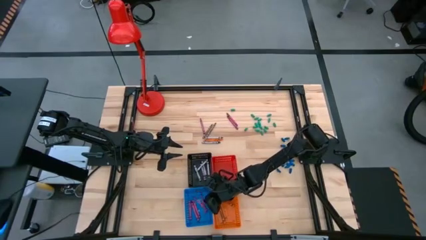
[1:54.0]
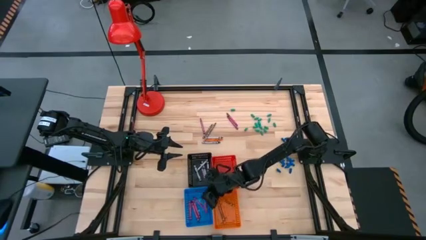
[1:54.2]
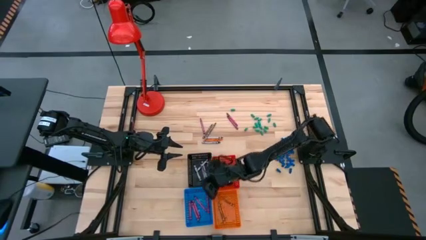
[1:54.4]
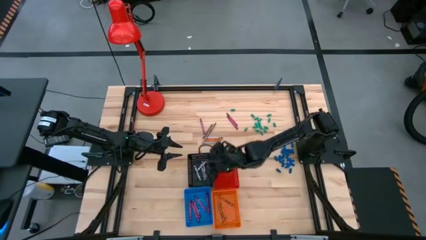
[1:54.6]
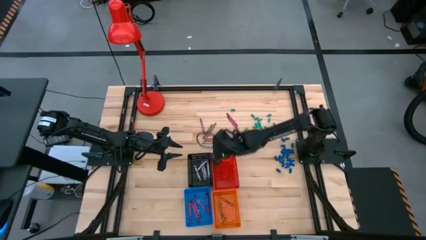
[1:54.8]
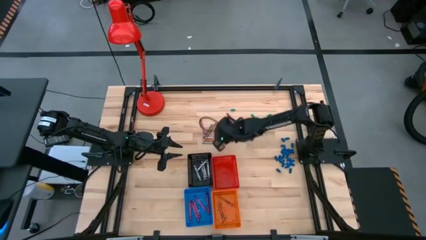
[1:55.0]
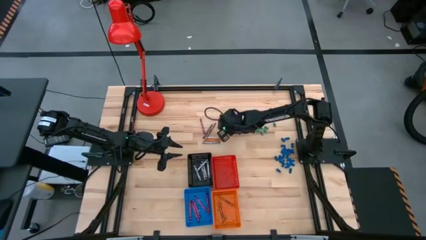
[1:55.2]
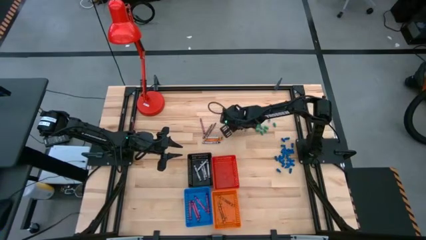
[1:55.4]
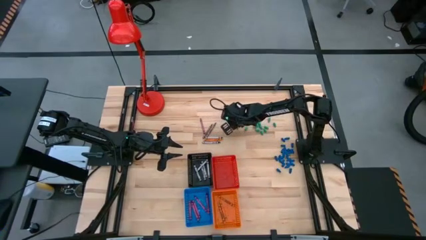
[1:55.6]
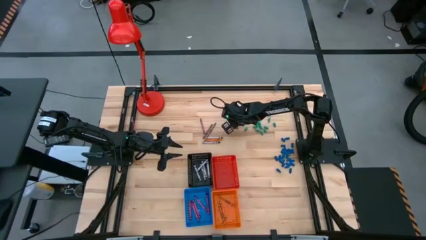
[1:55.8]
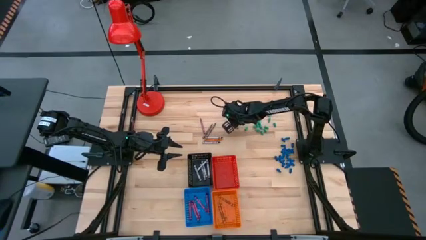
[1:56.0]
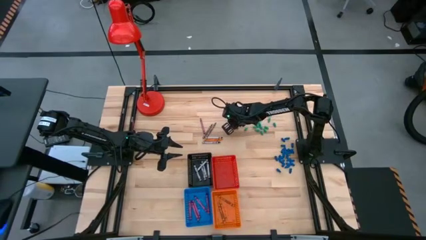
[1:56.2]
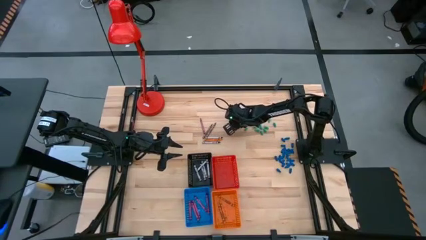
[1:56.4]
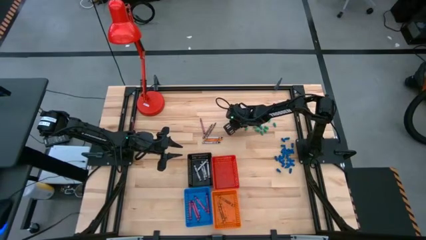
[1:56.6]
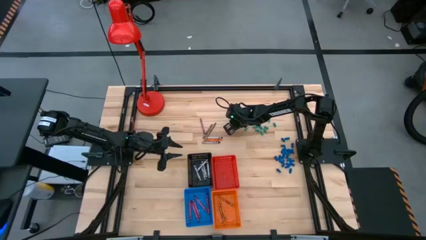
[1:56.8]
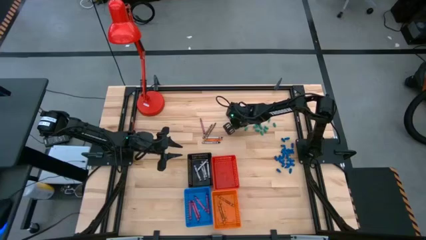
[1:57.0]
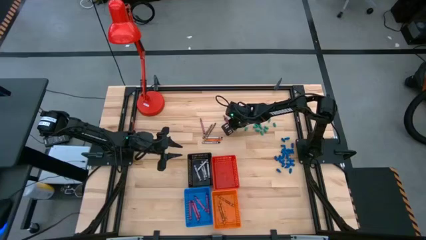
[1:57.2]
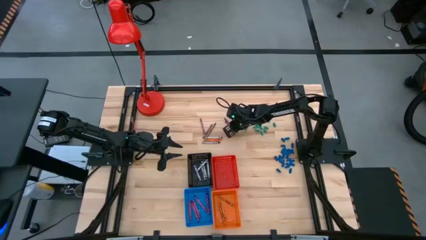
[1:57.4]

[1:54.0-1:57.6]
Task: Sort crayons
Put the red crayon into the blue basket

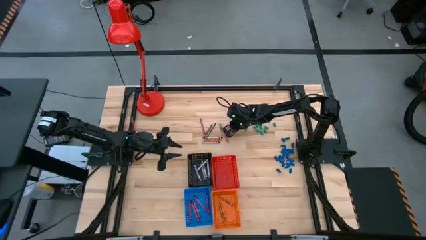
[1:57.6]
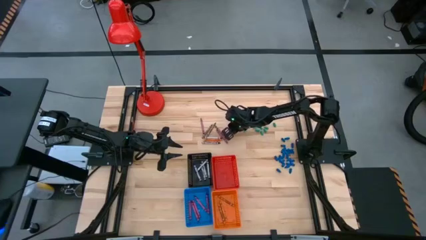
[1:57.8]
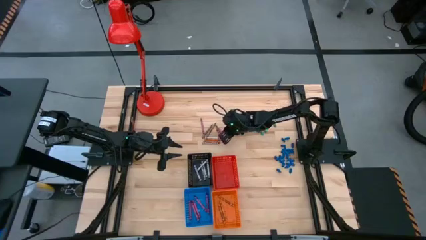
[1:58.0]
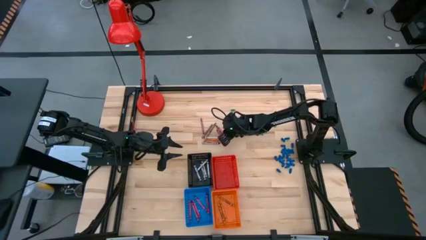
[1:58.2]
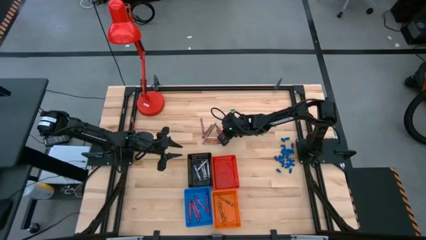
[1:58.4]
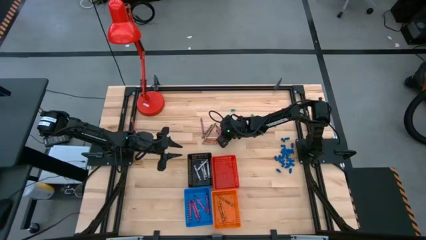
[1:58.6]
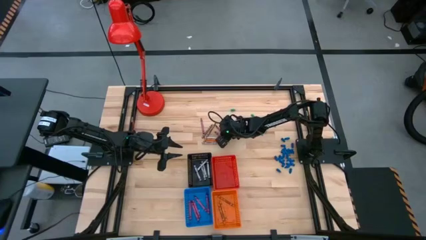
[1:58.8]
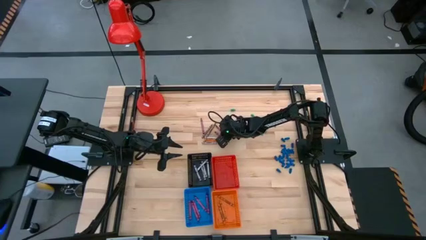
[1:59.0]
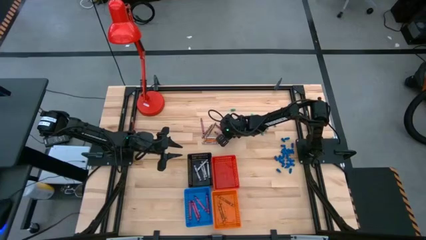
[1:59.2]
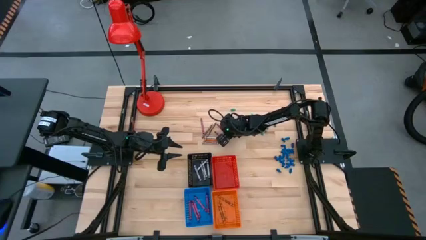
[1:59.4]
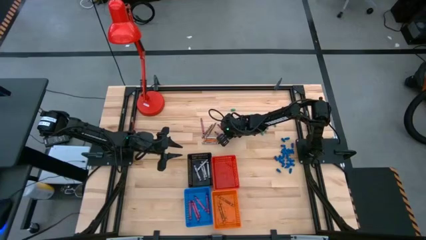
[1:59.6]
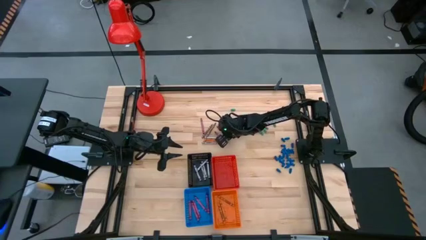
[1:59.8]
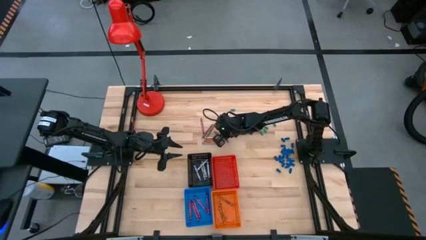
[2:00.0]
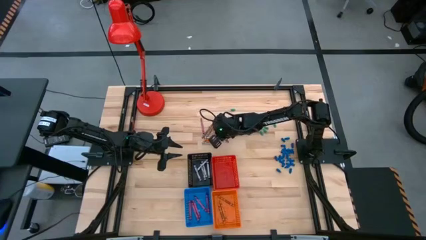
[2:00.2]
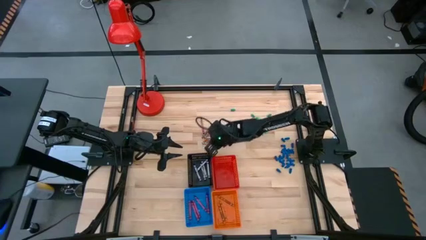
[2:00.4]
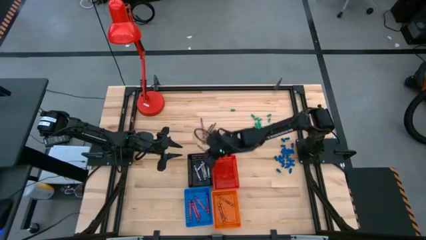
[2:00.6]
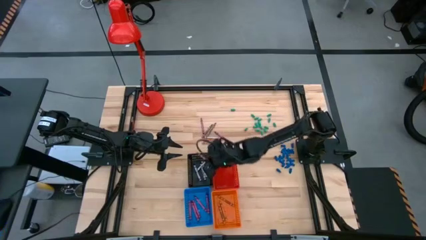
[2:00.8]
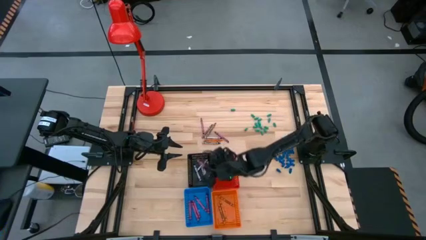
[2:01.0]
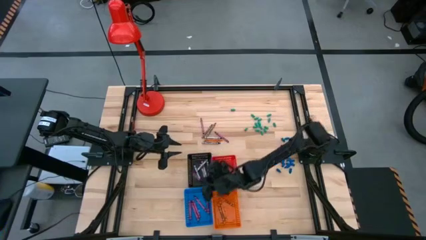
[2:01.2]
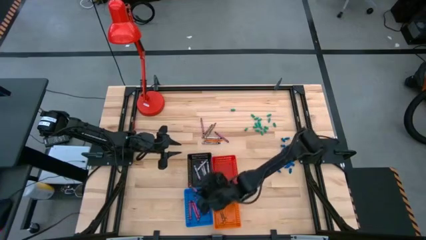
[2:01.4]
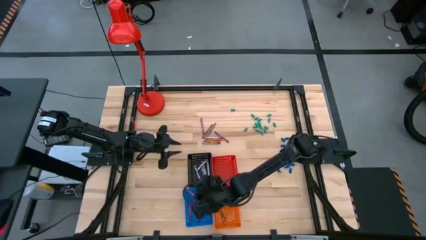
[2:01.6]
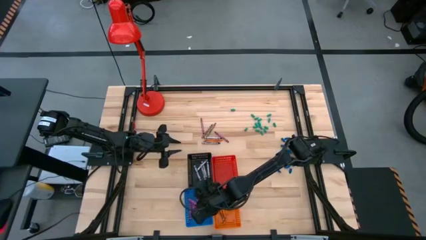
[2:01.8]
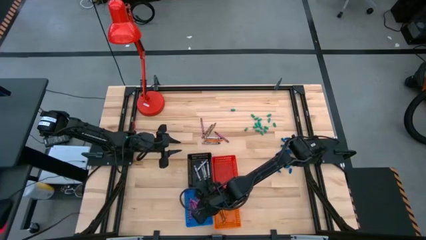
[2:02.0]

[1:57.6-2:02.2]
Put the red crayon into the blue basket

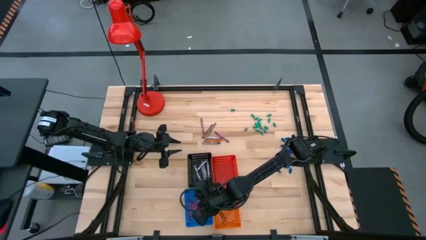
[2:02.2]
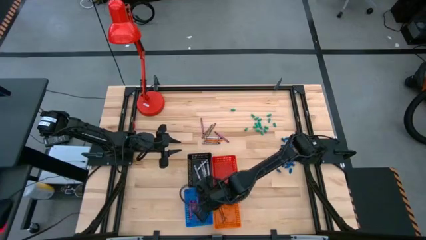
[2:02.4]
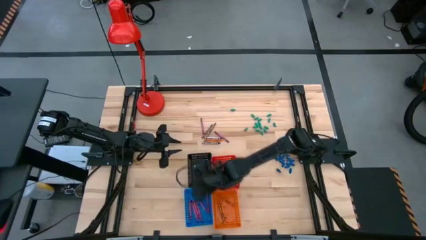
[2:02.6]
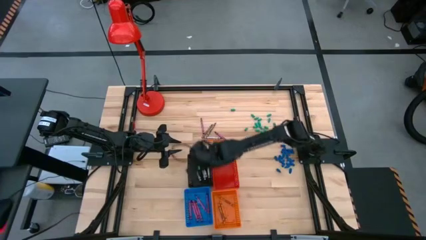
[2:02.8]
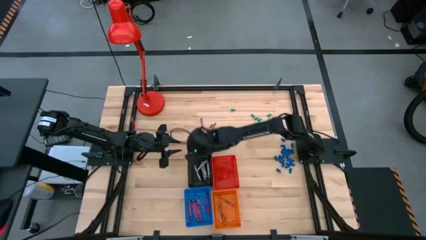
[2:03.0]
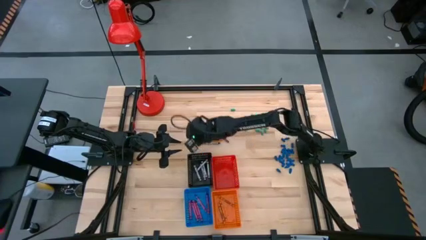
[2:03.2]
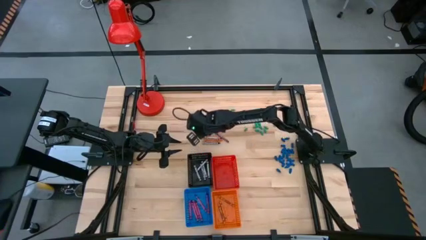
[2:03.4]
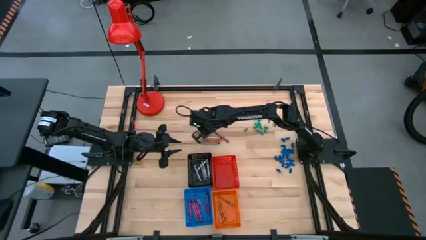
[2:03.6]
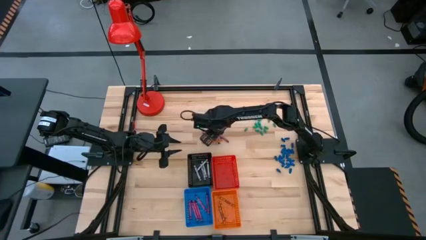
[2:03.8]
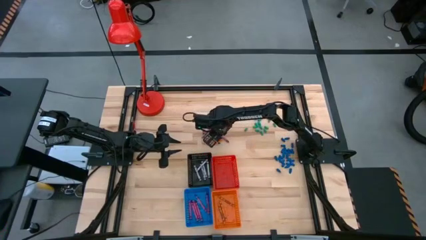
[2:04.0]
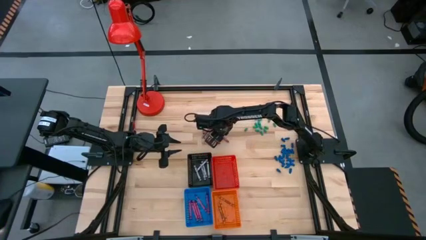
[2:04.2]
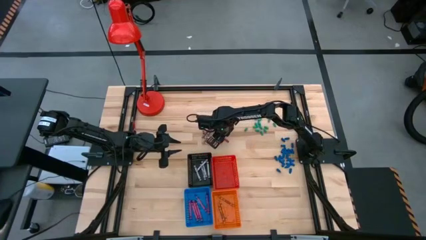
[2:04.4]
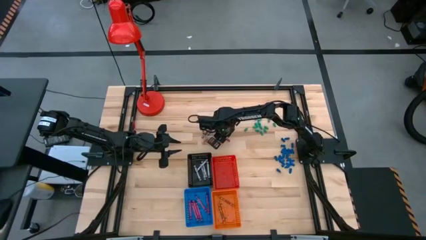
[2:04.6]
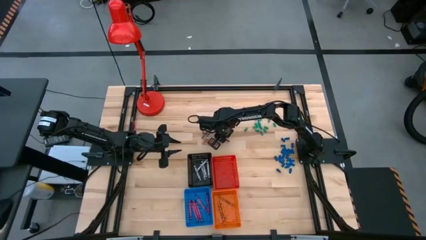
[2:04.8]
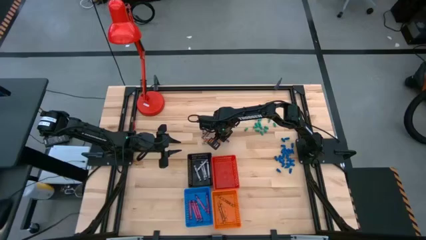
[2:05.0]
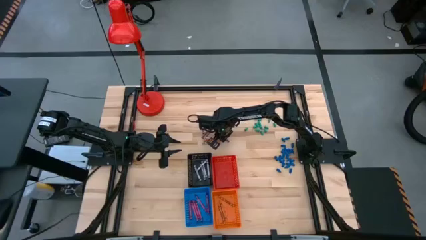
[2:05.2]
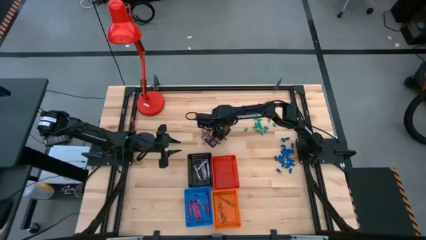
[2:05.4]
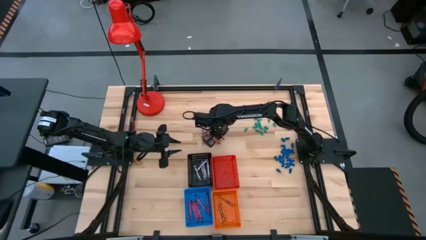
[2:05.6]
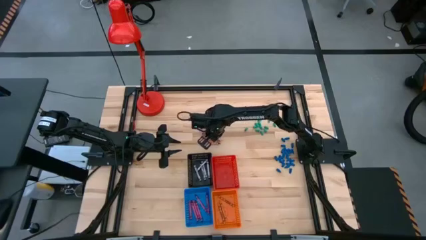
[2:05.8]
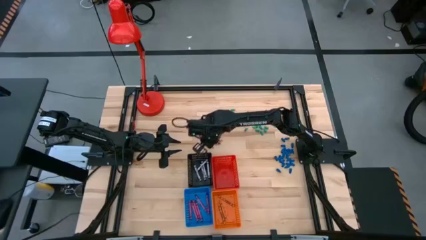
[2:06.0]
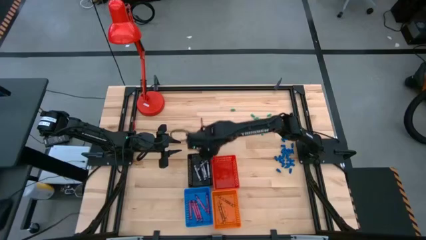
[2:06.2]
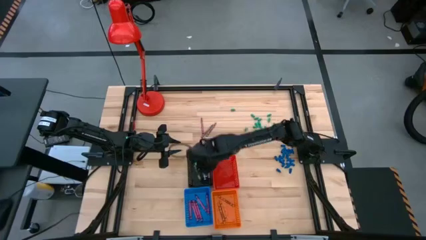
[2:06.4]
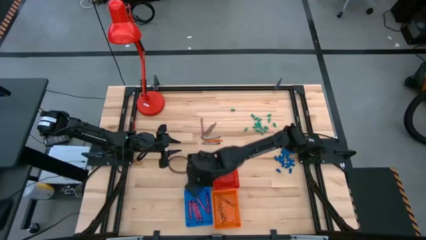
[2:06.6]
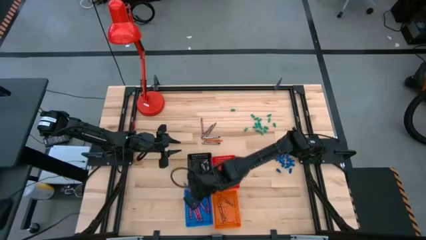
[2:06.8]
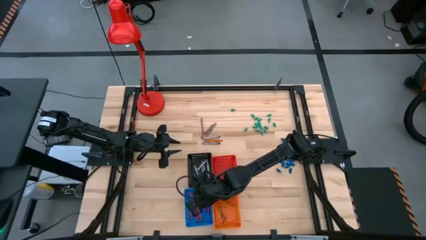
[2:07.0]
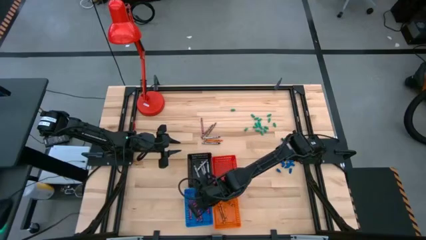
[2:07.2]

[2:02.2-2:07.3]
Put the red crayon into the blue basket
